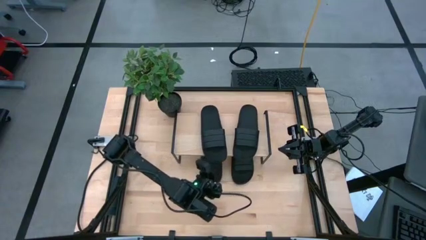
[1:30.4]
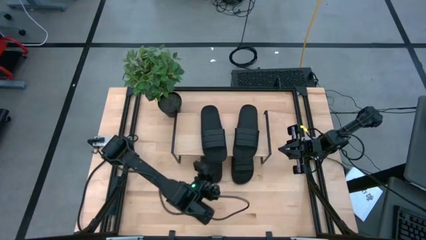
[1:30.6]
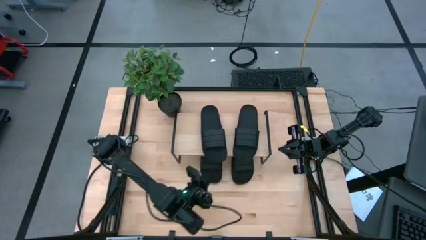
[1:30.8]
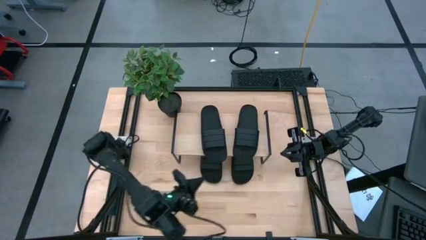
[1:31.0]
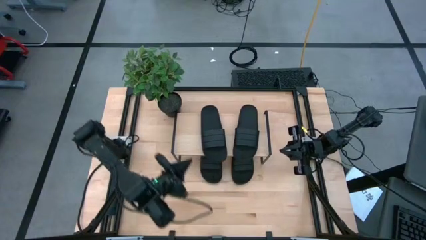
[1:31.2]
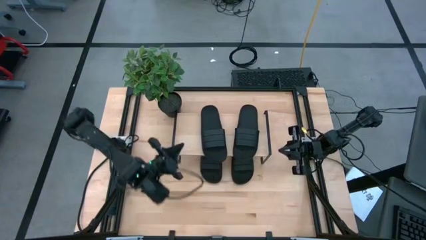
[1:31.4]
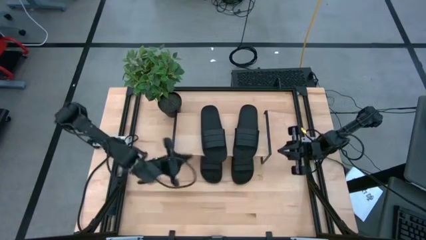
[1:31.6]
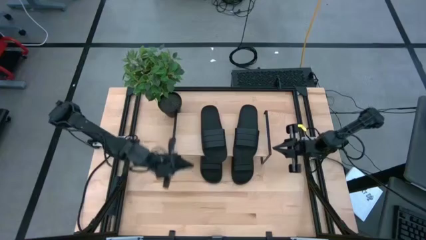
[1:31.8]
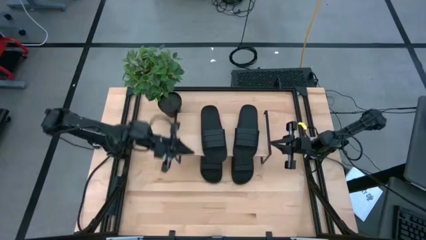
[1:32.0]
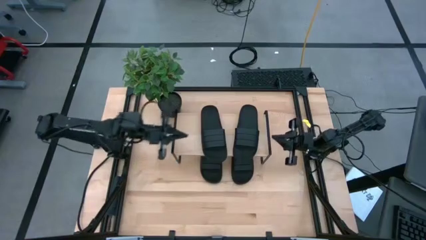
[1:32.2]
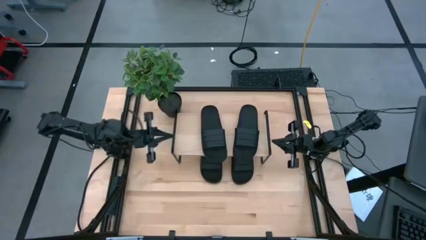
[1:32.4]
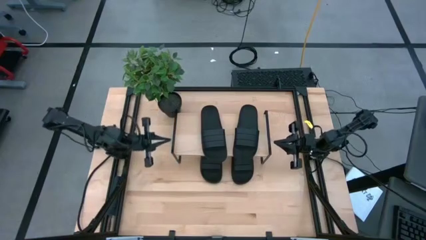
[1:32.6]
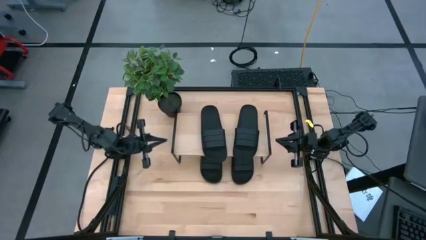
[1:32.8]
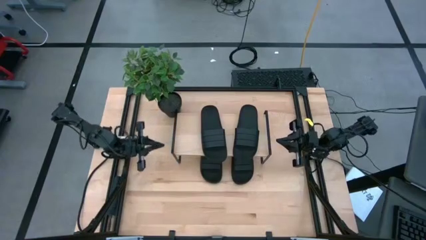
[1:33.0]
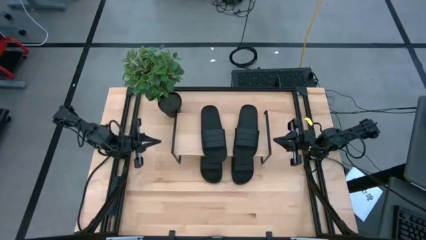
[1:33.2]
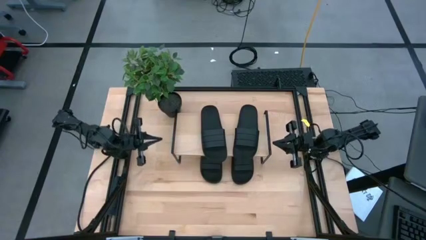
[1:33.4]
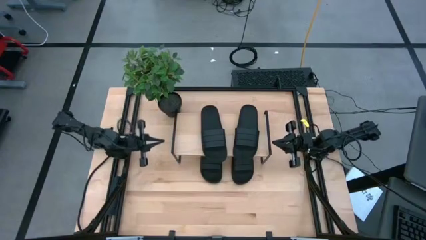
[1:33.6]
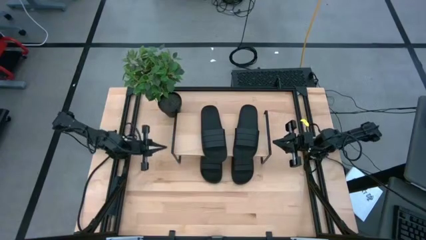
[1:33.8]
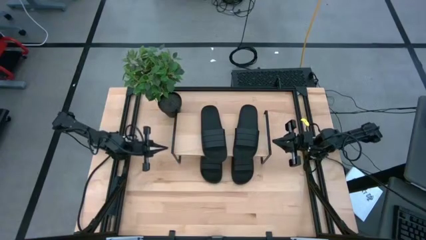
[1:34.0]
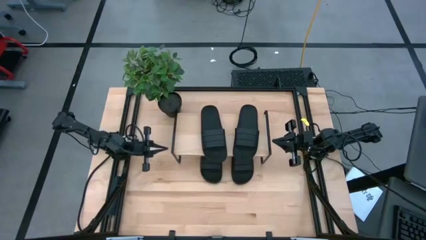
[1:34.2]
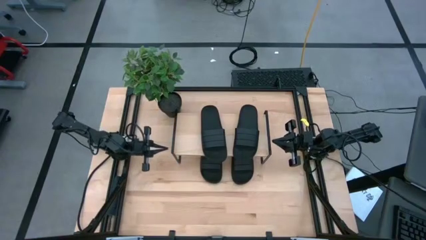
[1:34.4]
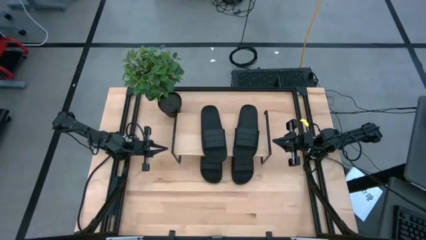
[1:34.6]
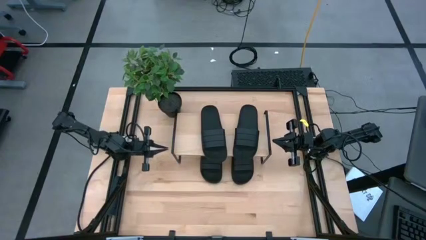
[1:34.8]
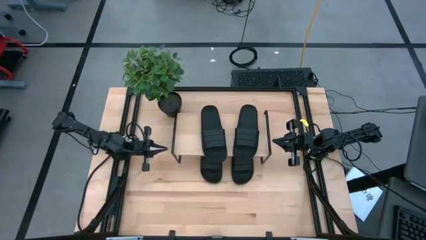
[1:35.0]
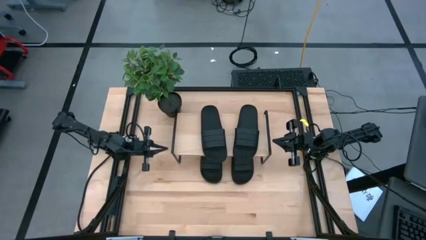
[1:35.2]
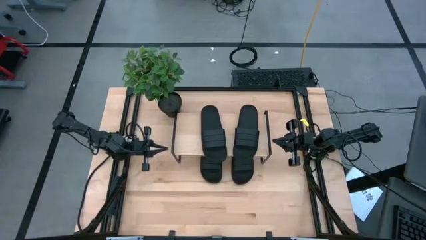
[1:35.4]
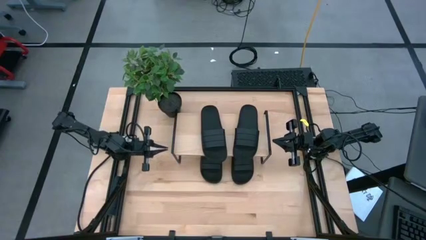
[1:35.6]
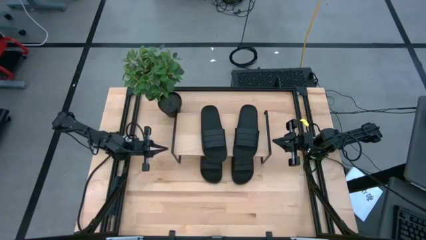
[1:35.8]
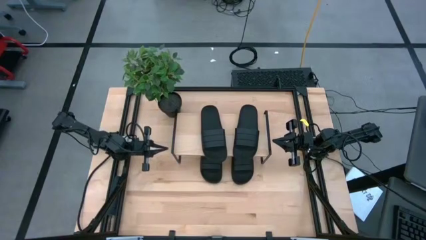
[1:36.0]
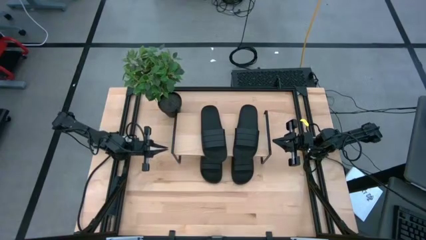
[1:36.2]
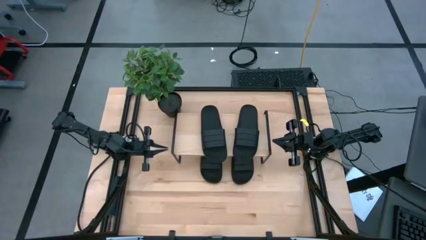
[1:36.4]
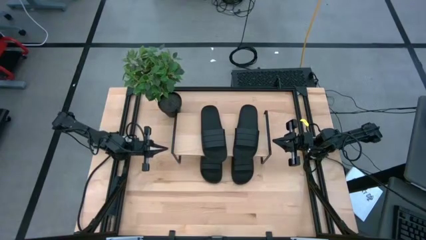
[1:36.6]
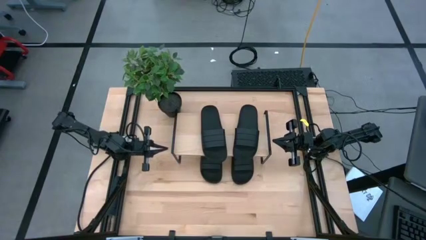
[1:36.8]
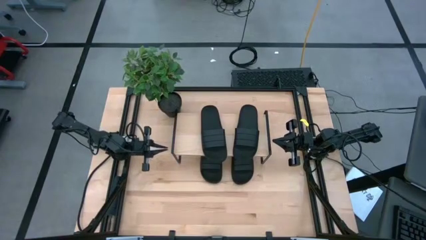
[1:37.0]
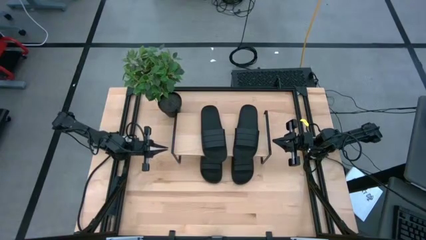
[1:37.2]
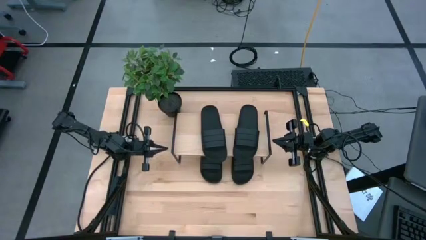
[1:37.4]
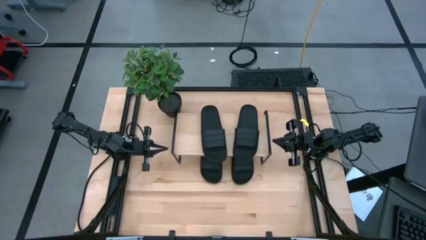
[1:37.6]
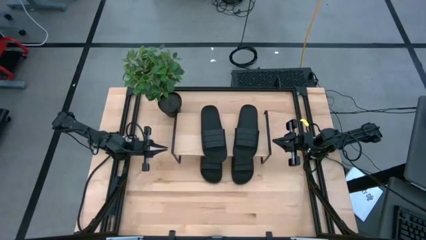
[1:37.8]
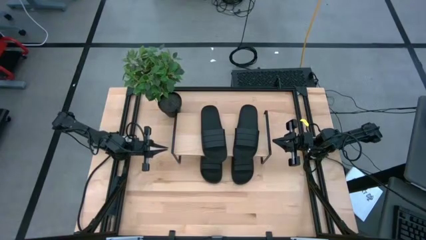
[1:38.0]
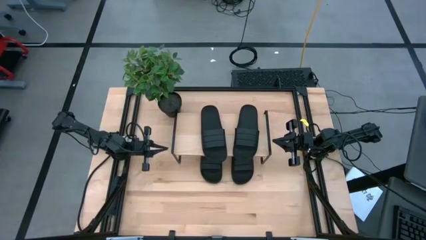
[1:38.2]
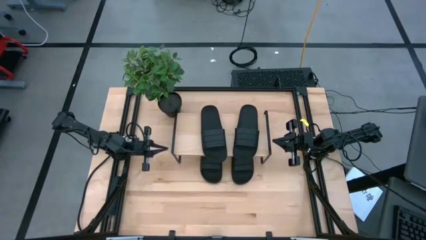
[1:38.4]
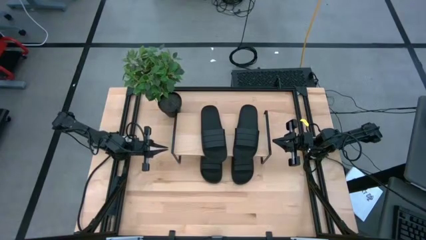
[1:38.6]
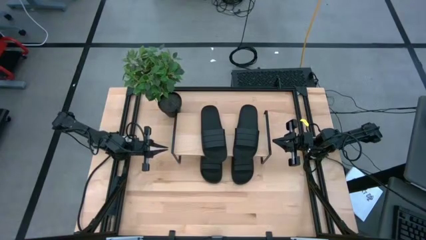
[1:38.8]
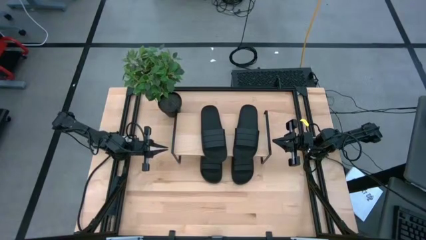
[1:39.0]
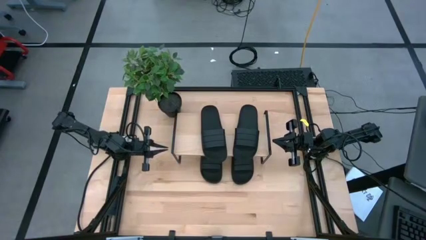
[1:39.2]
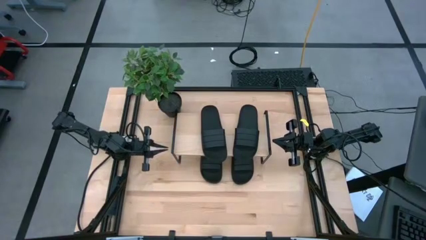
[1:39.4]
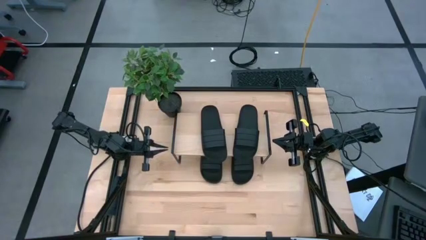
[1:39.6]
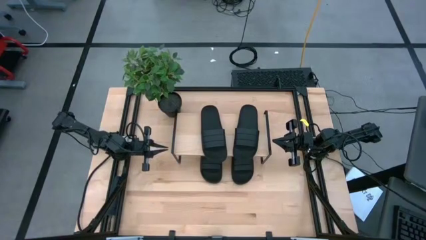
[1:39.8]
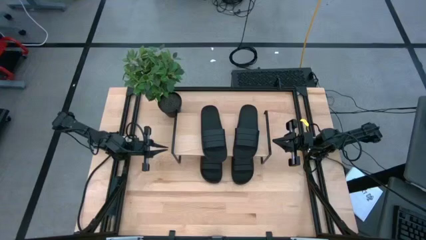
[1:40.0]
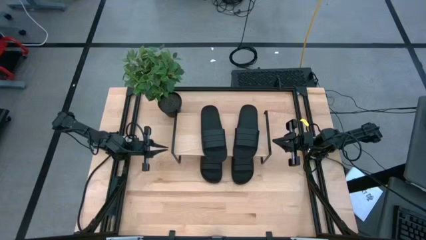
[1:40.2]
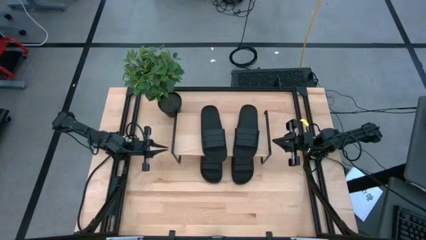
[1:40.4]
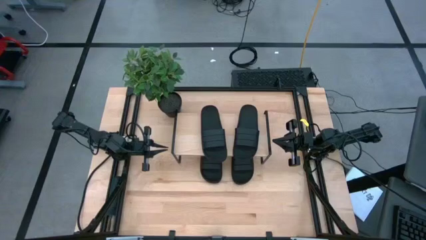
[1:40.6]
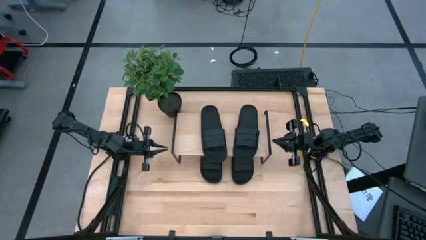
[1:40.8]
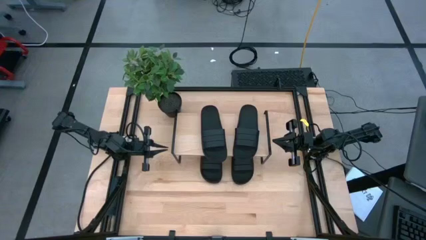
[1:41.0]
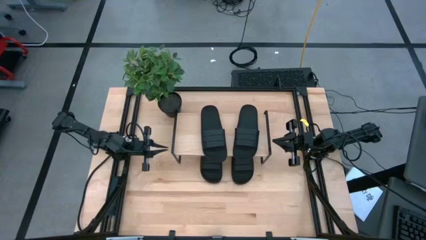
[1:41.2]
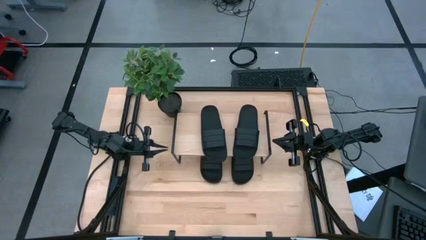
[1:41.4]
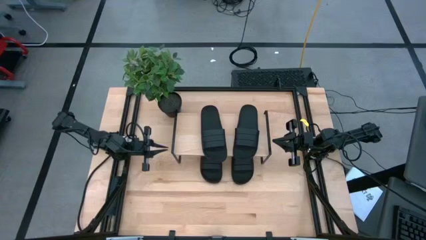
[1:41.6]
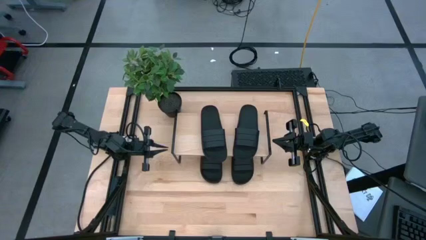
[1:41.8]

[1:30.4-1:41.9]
Task: Pick and place slides into the shelf
Return to Home Position

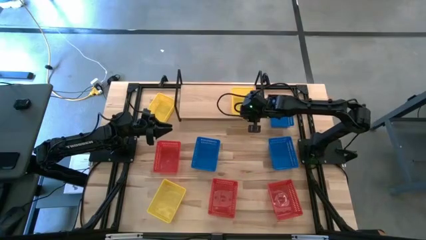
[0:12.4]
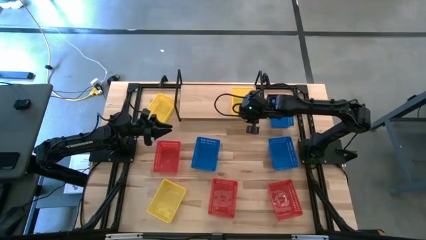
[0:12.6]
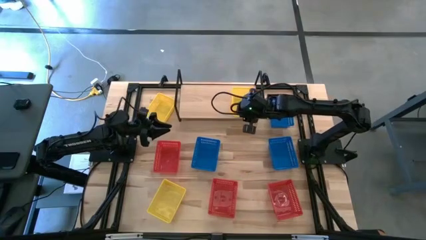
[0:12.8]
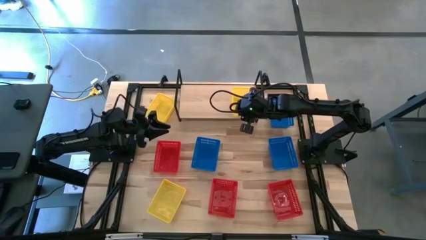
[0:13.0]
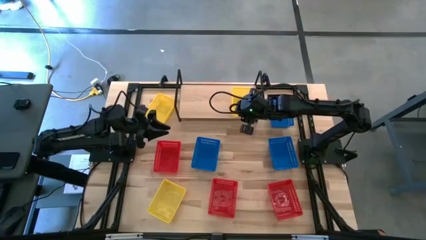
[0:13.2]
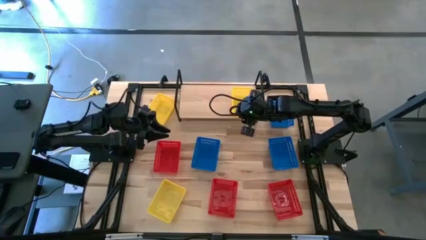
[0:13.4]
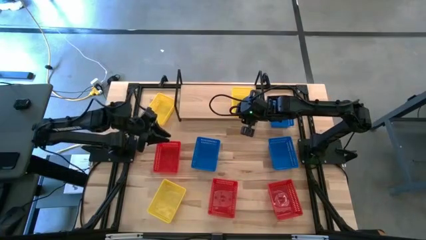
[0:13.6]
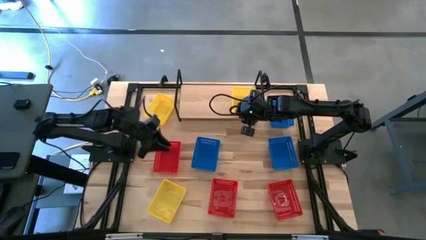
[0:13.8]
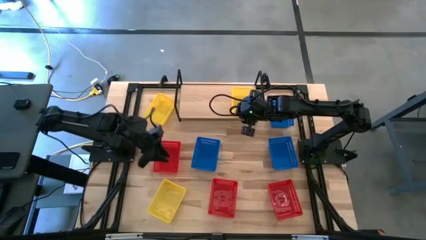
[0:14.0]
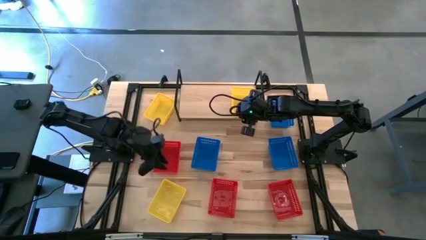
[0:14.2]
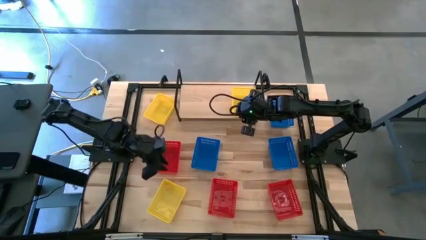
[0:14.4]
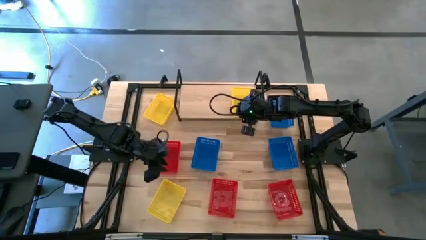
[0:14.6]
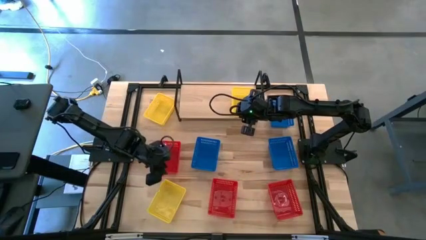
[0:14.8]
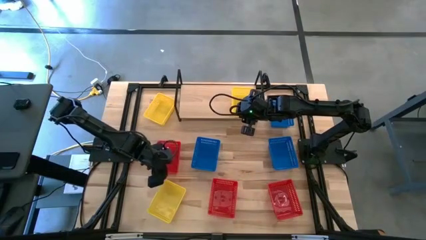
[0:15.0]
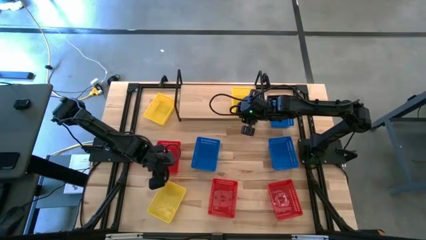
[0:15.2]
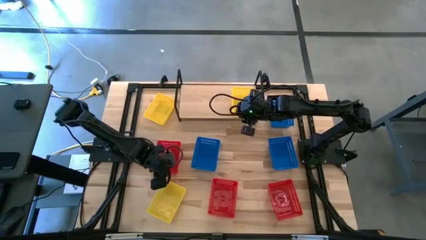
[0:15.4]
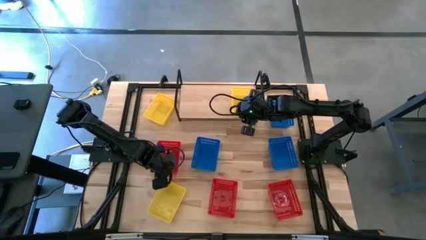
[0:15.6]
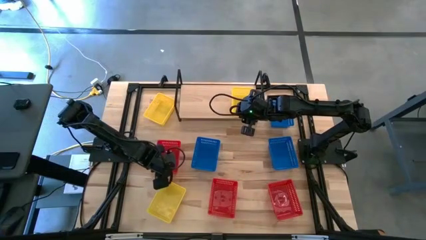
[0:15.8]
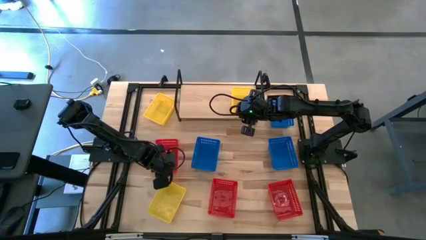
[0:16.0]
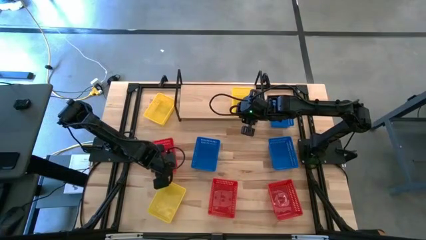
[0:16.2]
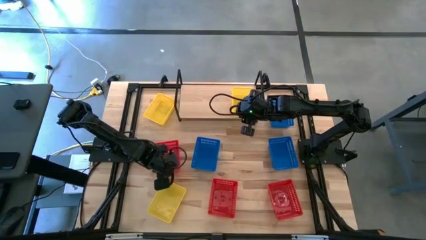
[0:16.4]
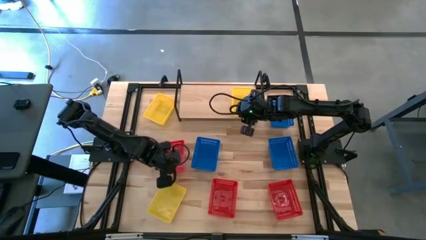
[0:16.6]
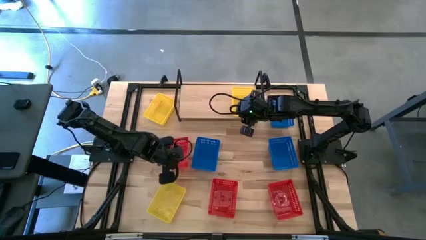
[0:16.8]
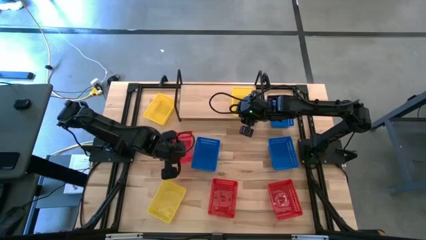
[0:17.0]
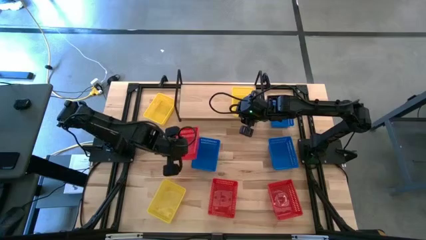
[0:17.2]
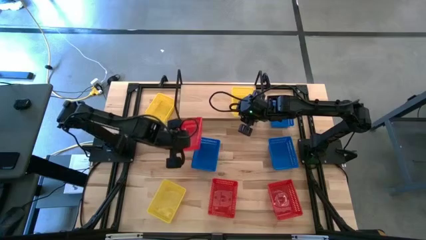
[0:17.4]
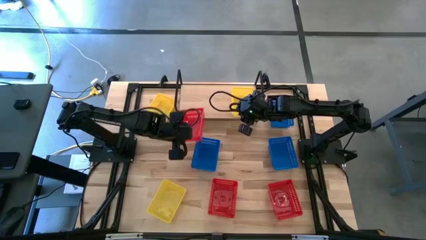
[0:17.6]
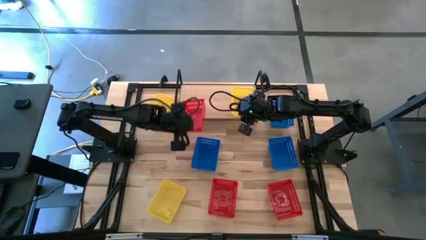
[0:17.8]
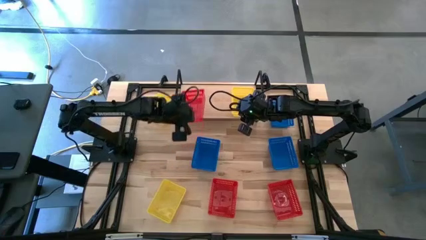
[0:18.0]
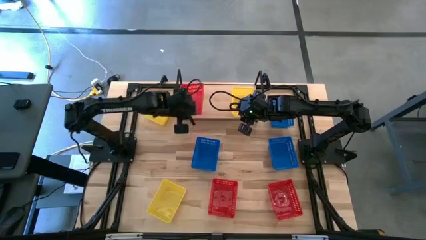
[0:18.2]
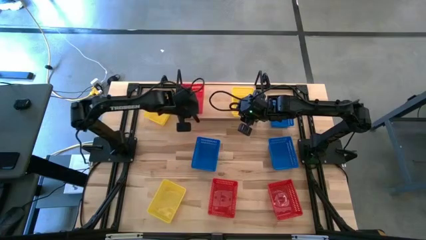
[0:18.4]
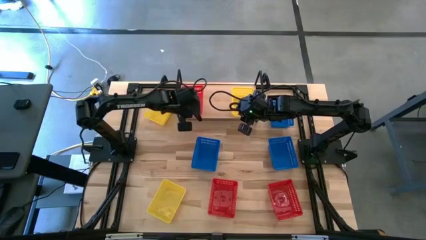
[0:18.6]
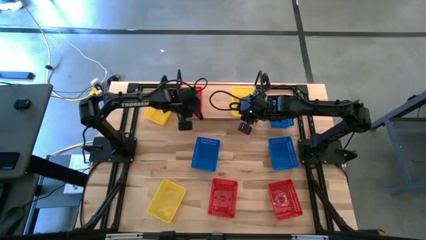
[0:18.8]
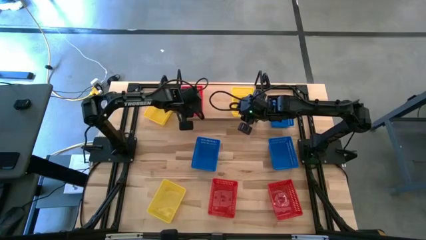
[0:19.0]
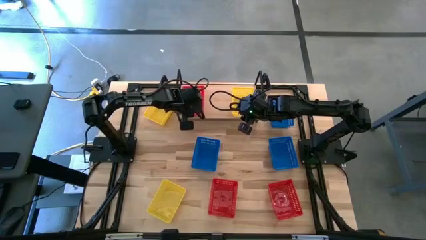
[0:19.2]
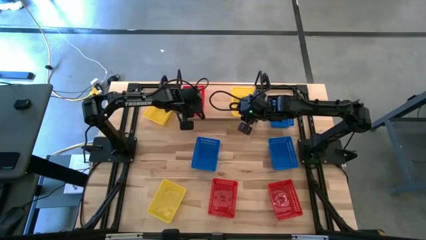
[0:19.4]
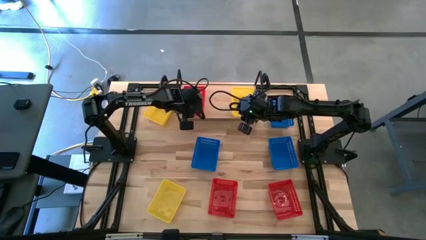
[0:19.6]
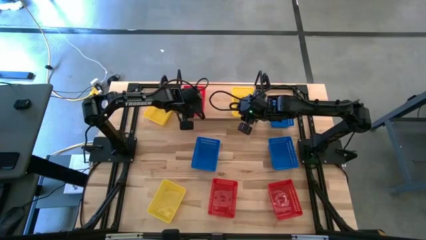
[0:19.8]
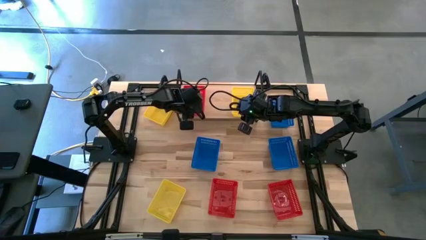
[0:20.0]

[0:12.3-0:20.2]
Task: Stack baskets on shelf by color
Put the left red bin on the shelf
